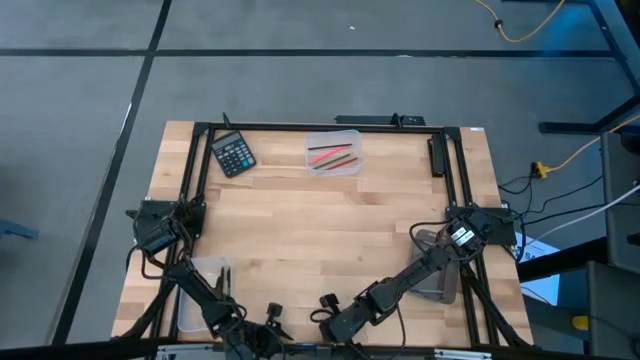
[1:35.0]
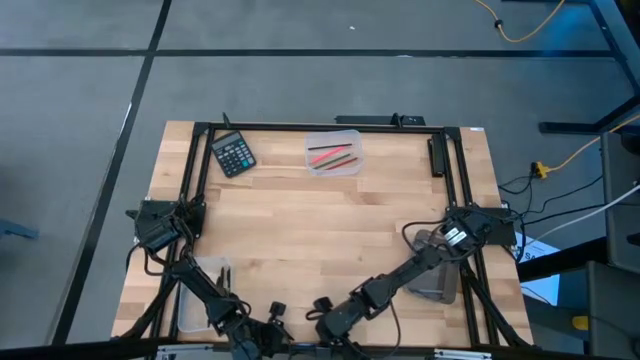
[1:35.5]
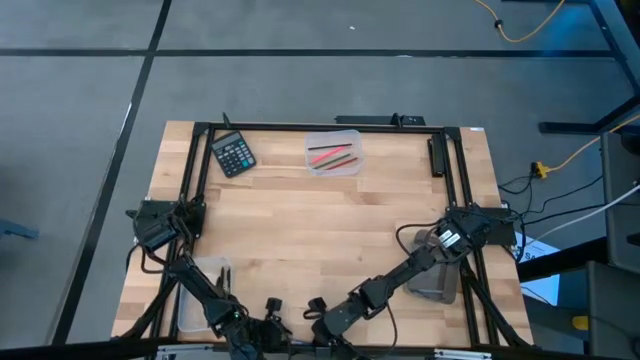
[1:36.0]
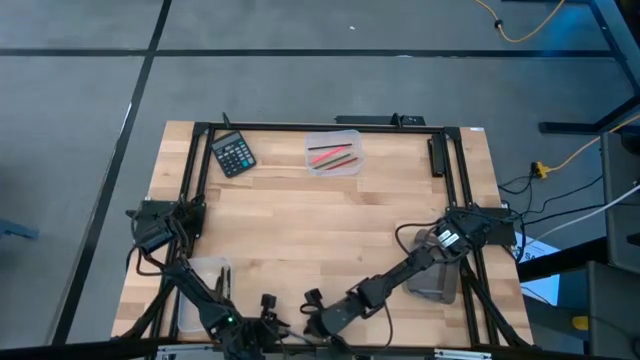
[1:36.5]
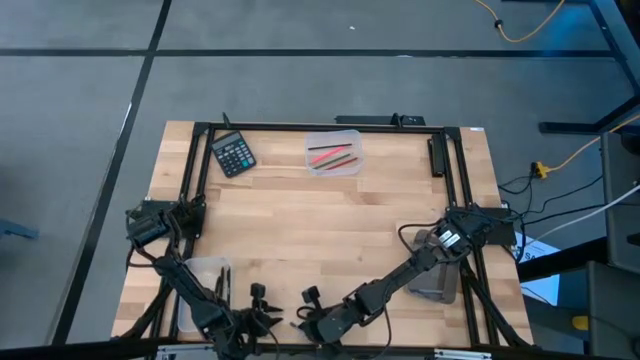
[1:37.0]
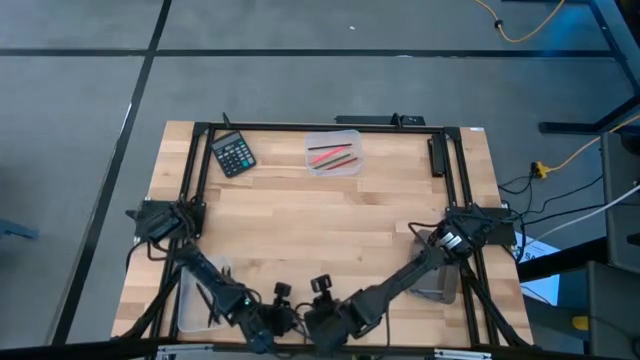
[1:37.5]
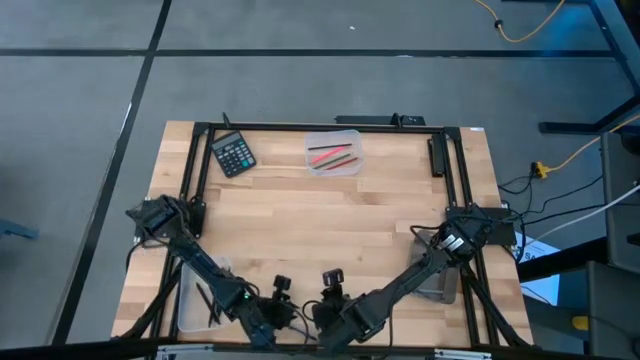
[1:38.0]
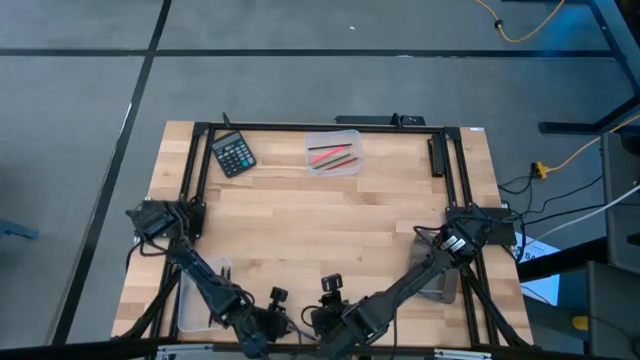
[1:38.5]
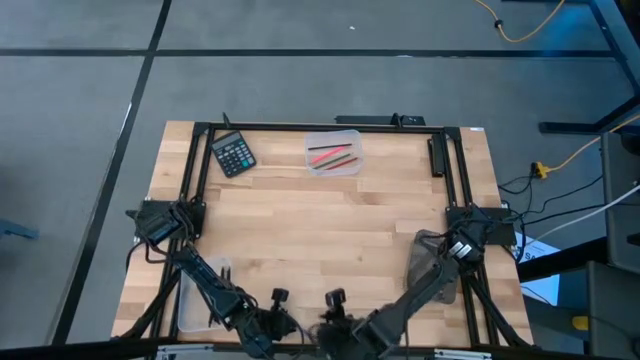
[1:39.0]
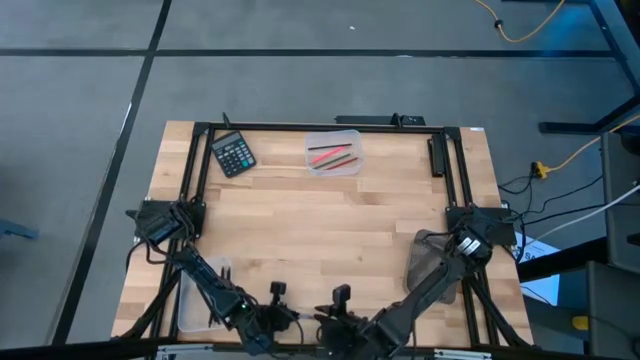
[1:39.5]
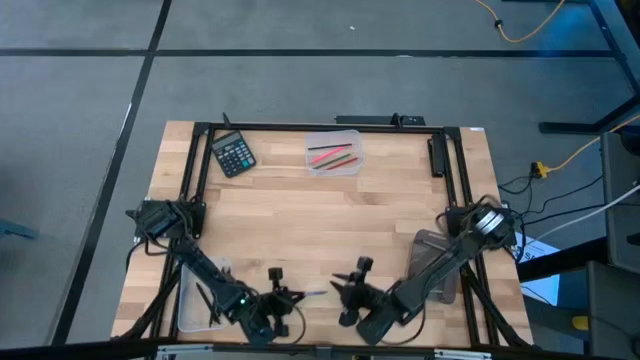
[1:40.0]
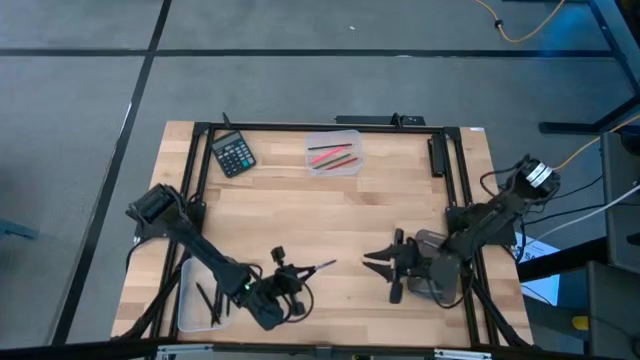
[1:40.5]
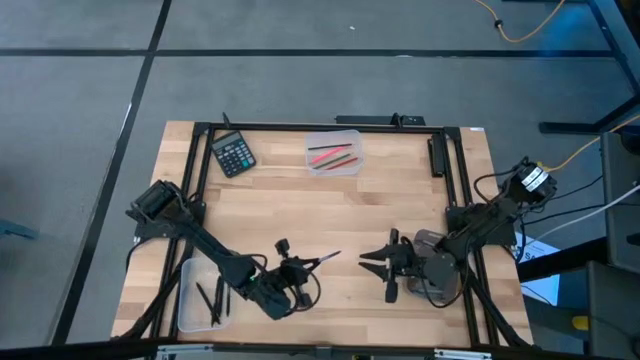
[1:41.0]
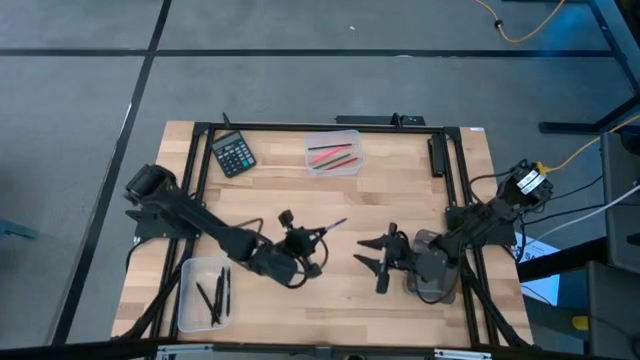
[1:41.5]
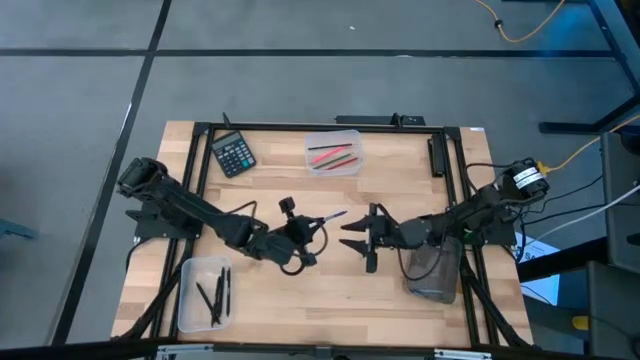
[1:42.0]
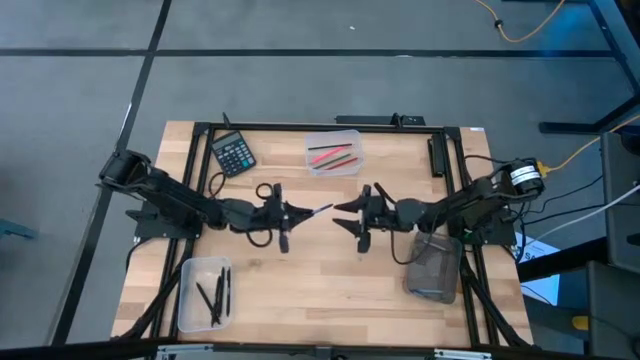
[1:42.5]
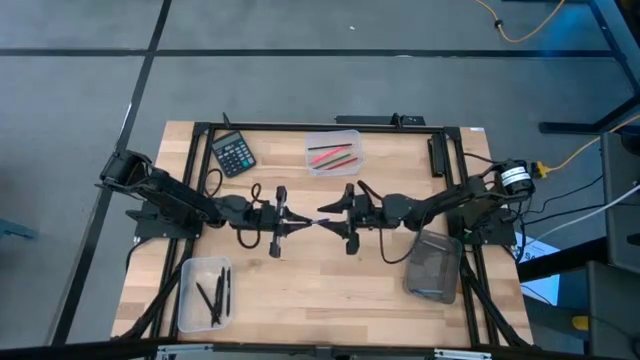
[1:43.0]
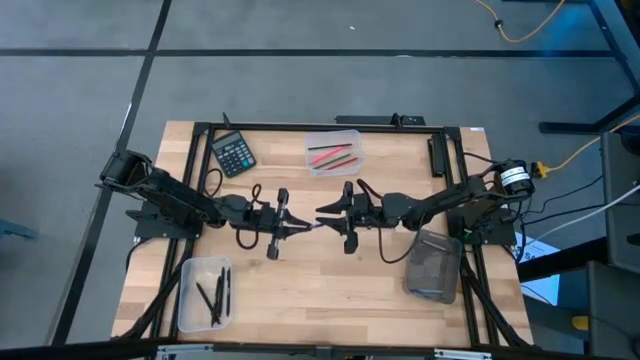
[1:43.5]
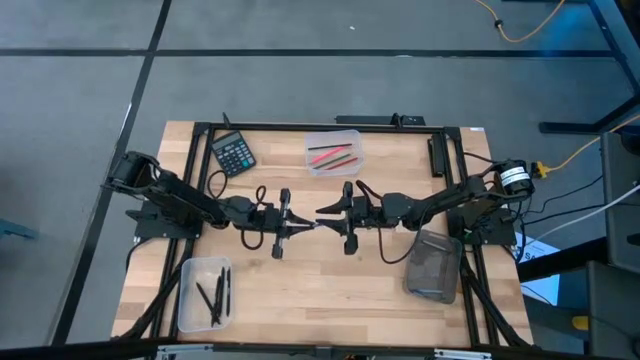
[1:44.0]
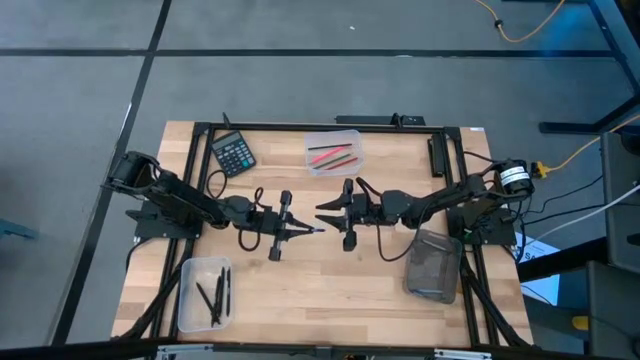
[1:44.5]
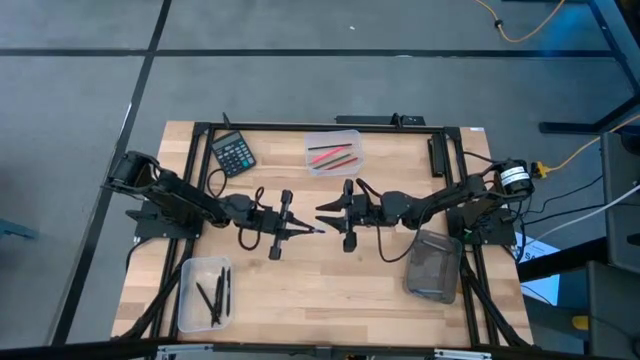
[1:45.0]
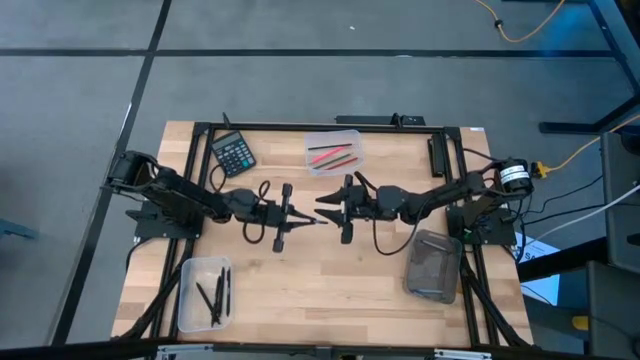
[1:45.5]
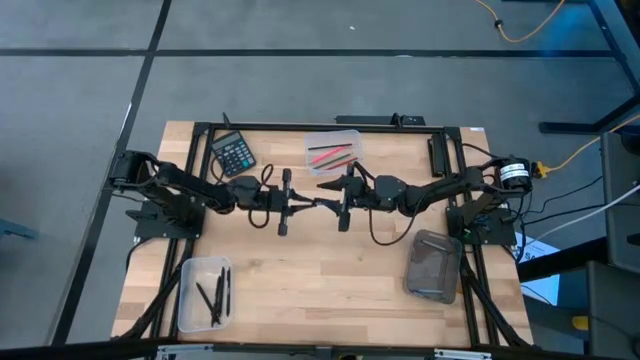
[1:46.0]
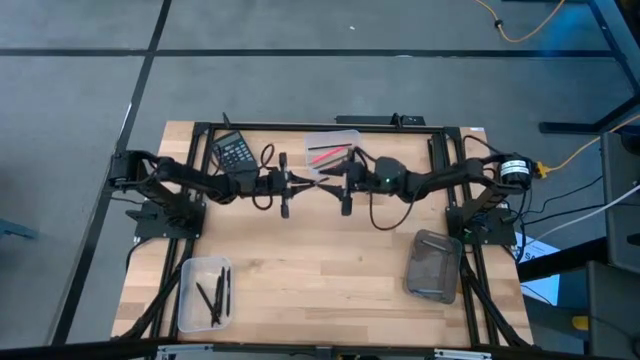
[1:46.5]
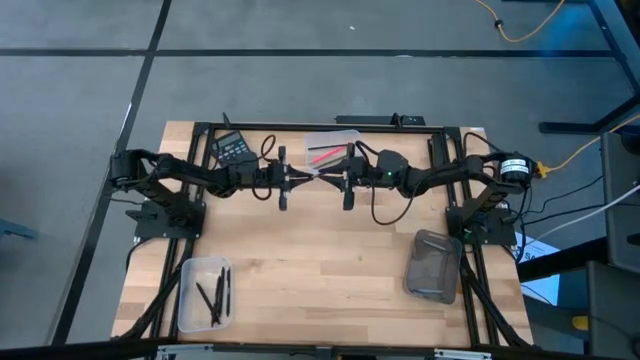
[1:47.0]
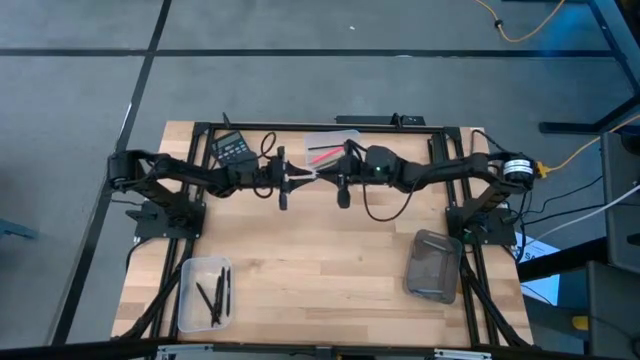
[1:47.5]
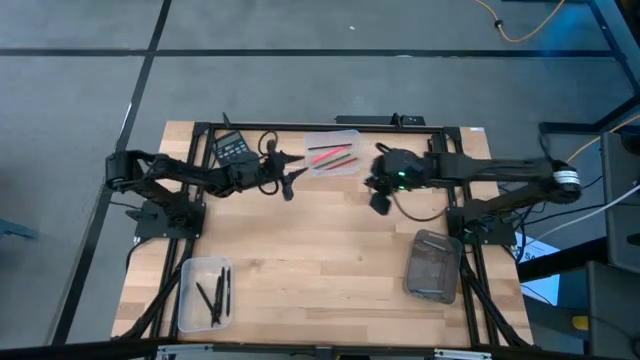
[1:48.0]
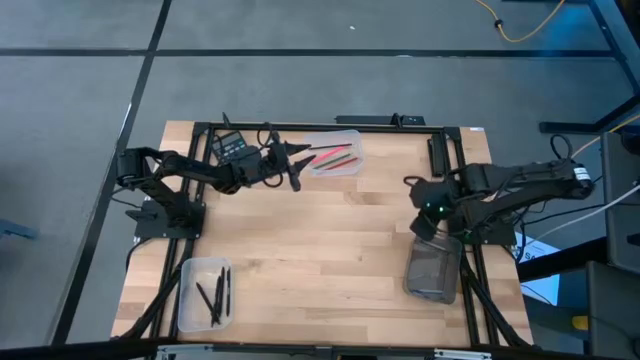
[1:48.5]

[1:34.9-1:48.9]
Task: Sort crayons/erasers/pens/pencils in bins
Put the blue crayon into the black bin

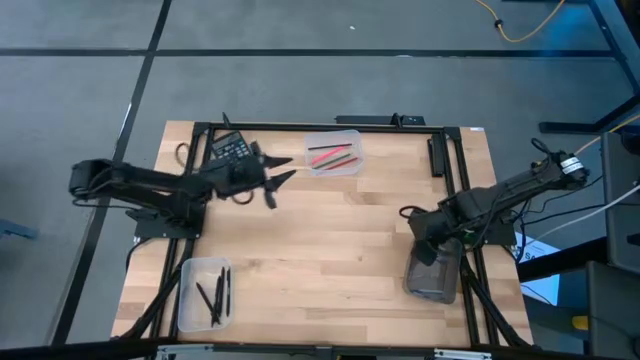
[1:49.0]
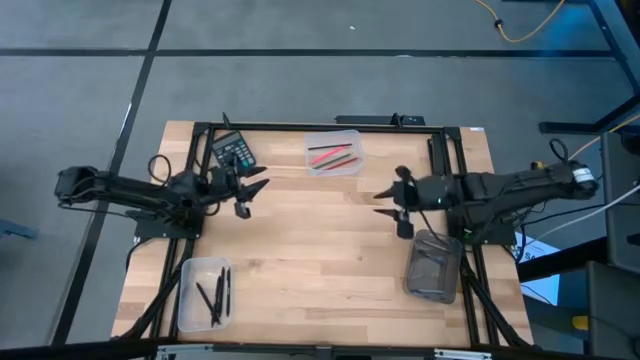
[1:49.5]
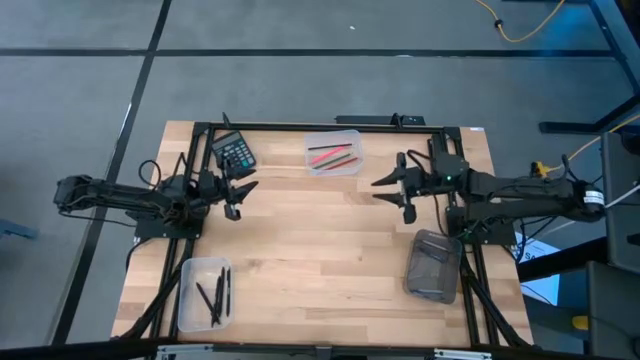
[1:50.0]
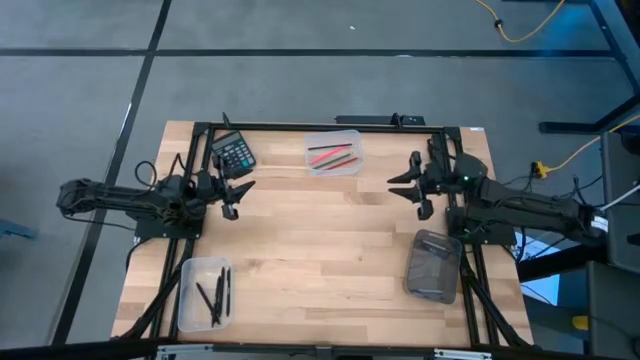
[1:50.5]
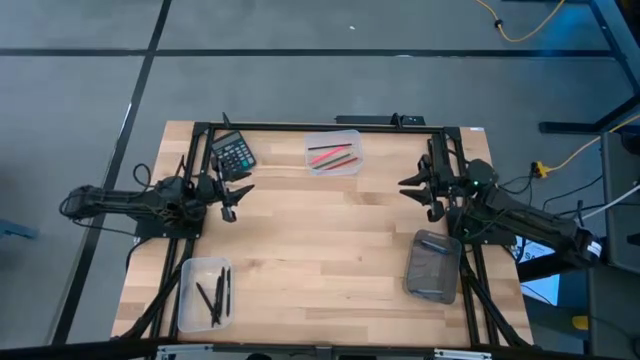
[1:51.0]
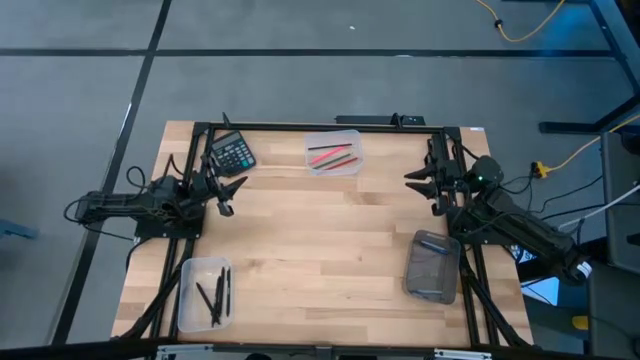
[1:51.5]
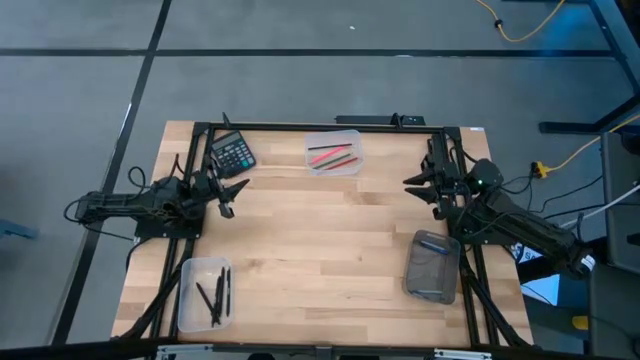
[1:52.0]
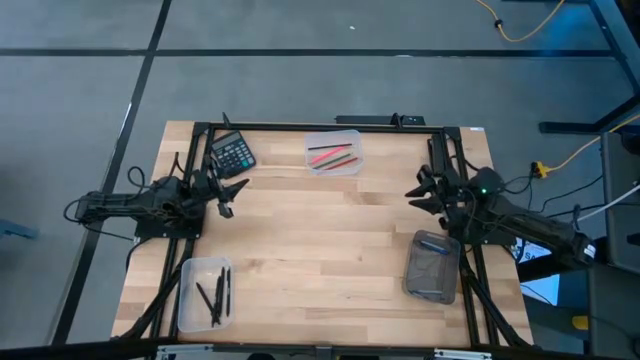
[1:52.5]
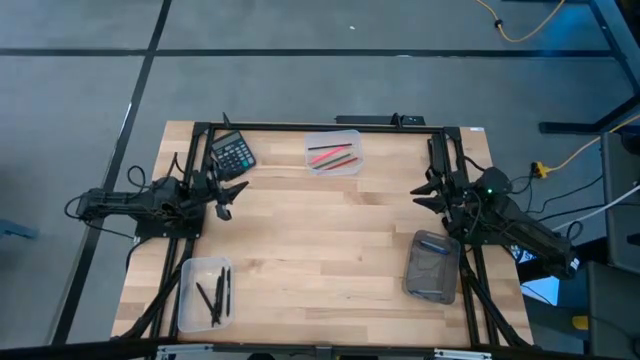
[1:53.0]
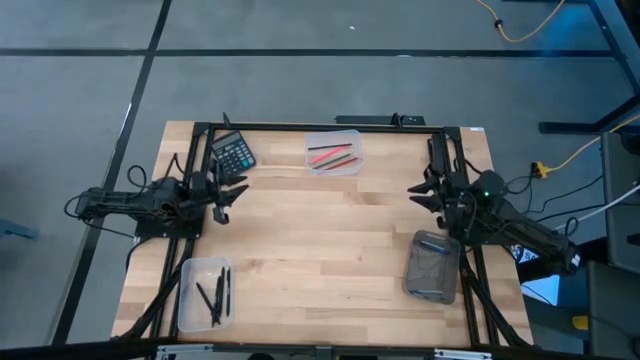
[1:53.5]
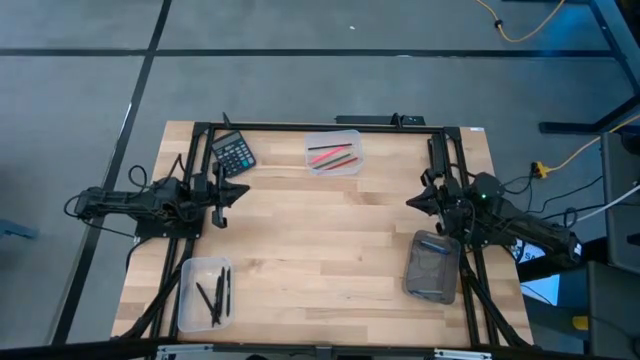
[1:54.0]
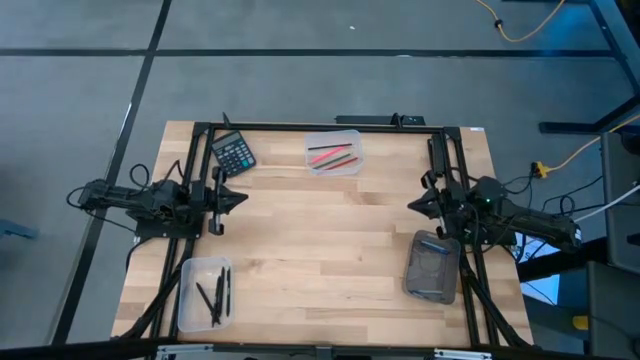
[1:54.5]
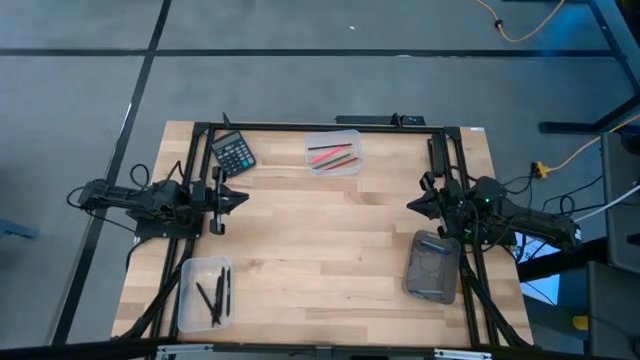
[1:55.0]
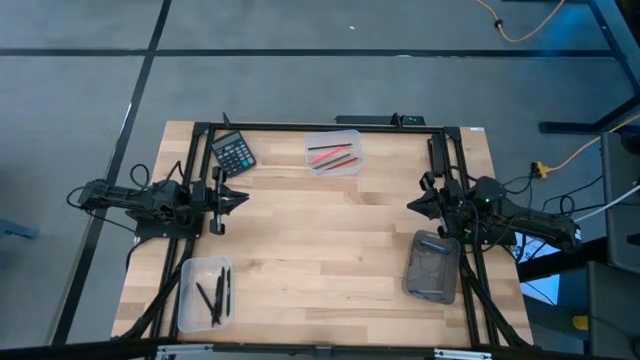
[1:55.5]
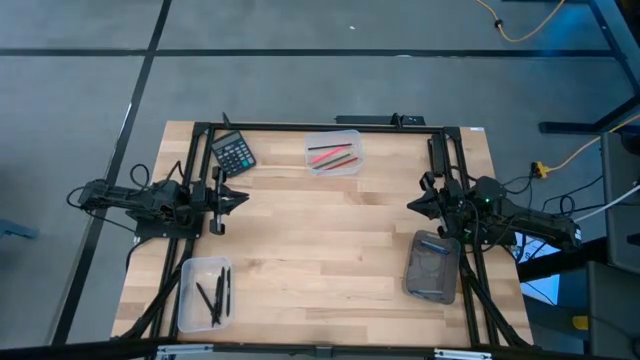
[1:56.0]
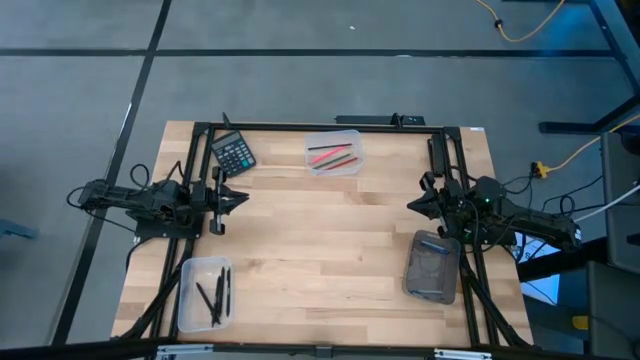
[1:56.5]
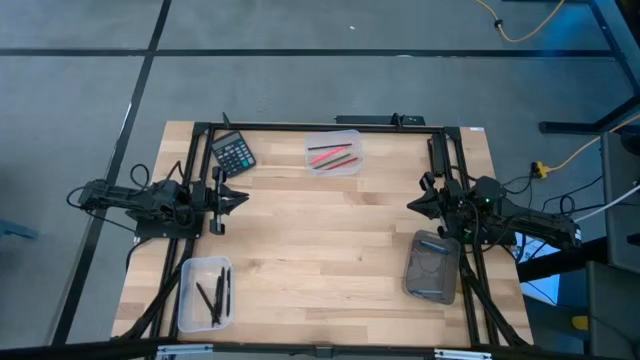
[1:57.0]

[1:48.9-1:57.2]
Return to Home Position
